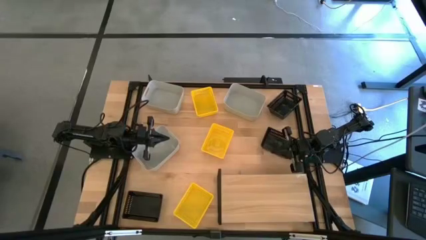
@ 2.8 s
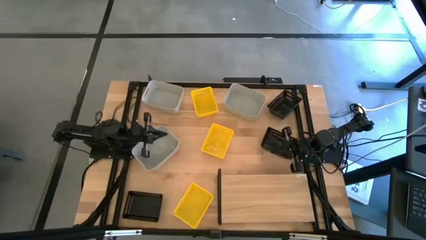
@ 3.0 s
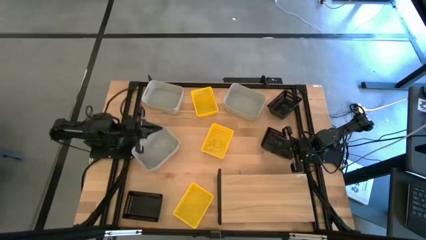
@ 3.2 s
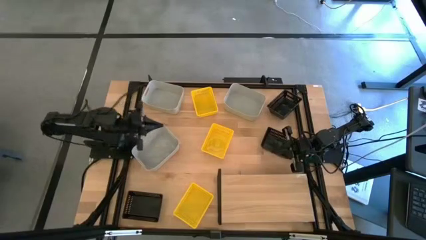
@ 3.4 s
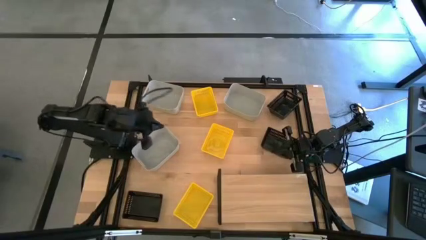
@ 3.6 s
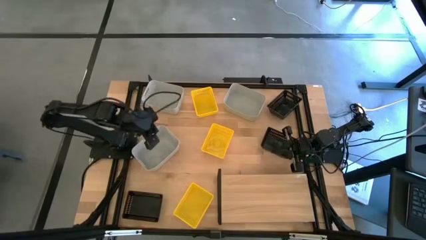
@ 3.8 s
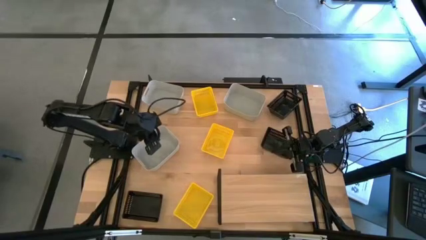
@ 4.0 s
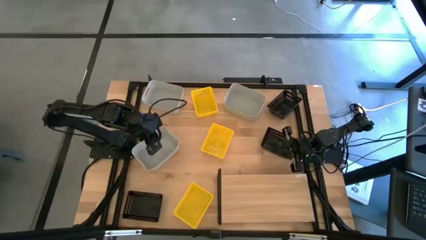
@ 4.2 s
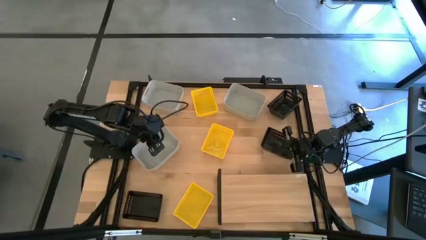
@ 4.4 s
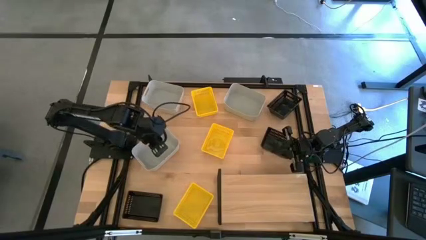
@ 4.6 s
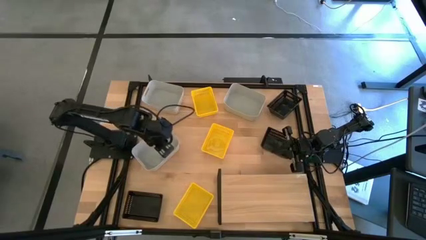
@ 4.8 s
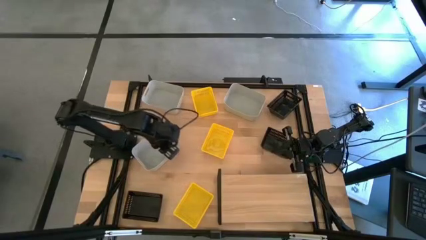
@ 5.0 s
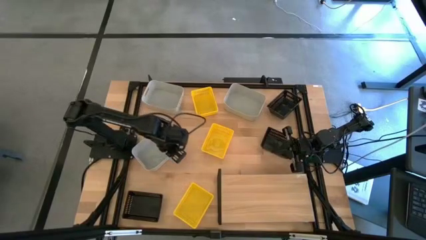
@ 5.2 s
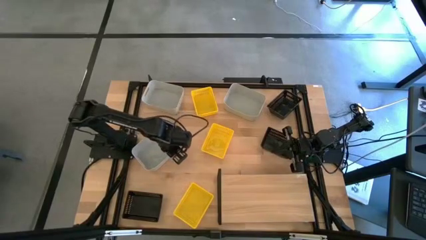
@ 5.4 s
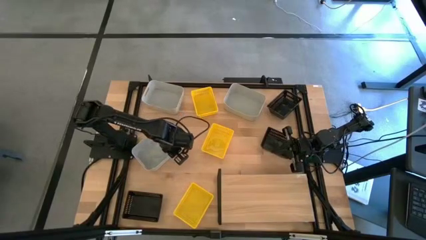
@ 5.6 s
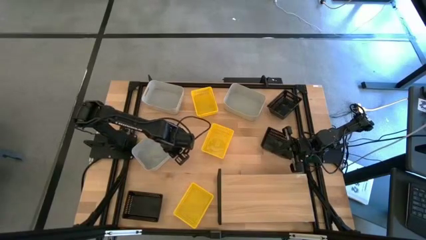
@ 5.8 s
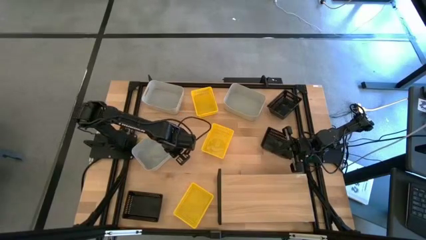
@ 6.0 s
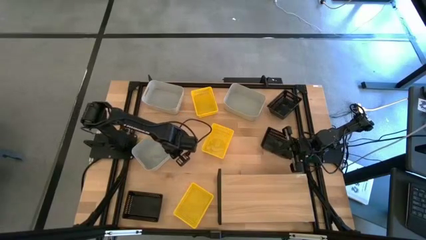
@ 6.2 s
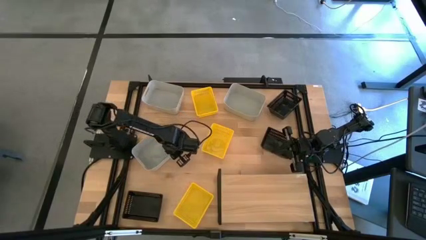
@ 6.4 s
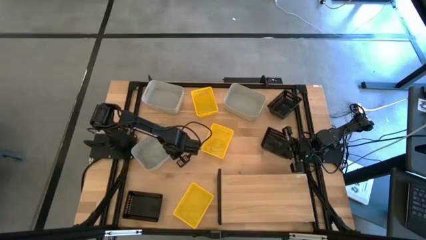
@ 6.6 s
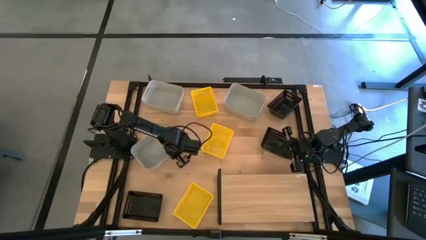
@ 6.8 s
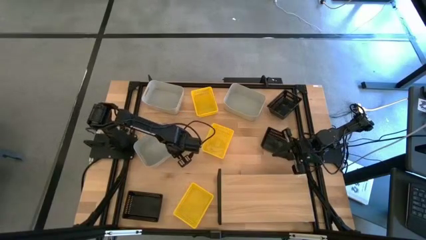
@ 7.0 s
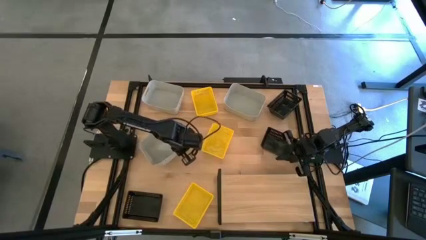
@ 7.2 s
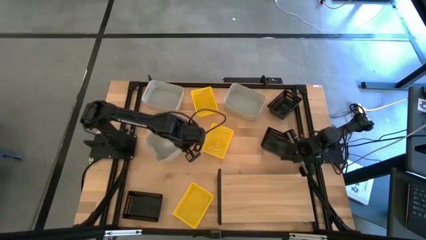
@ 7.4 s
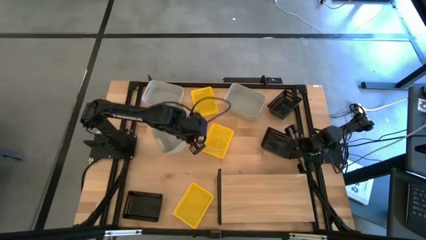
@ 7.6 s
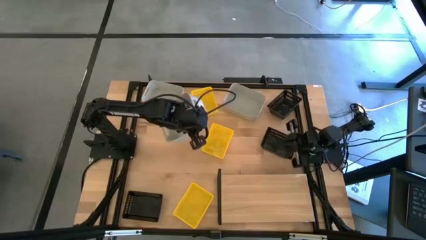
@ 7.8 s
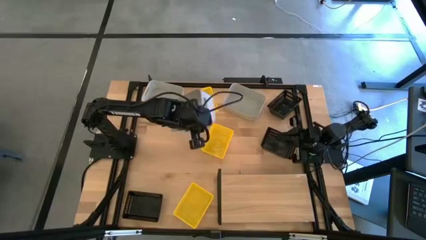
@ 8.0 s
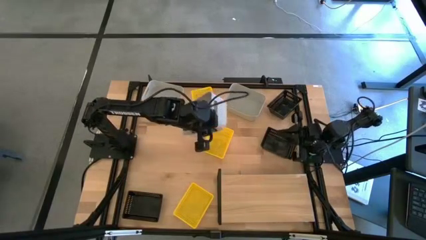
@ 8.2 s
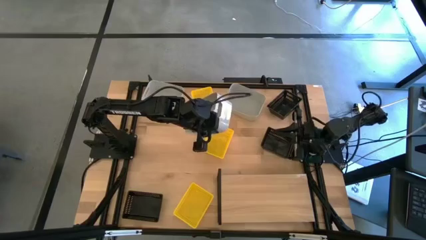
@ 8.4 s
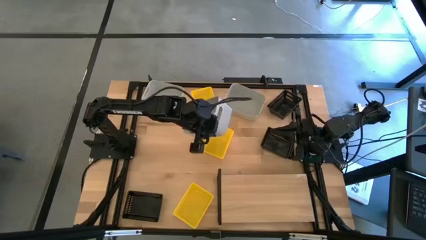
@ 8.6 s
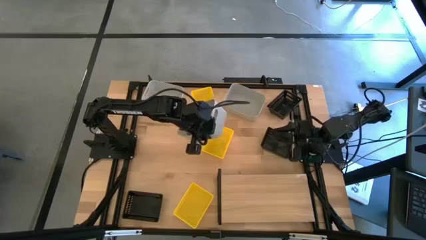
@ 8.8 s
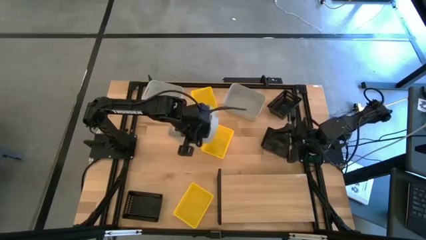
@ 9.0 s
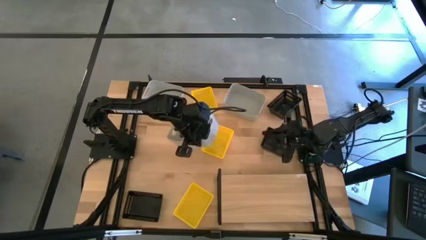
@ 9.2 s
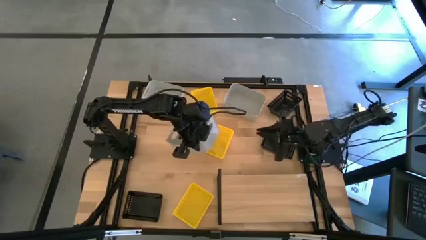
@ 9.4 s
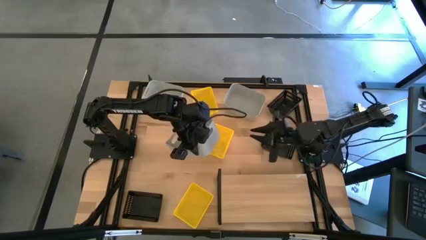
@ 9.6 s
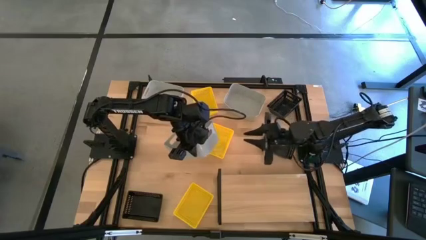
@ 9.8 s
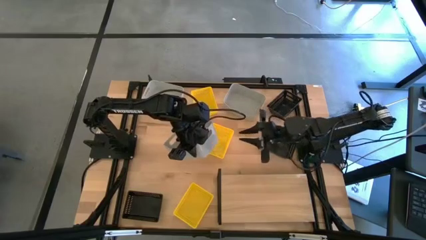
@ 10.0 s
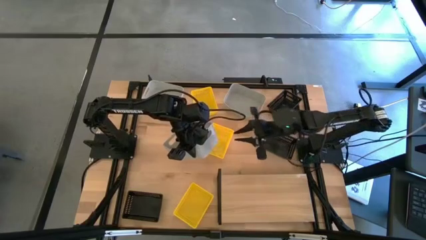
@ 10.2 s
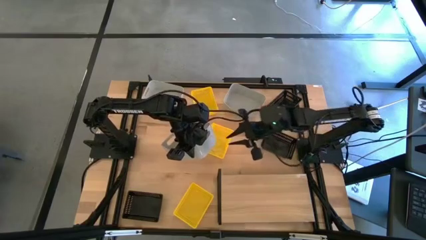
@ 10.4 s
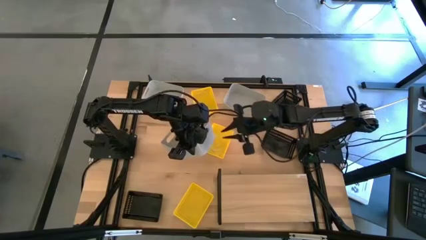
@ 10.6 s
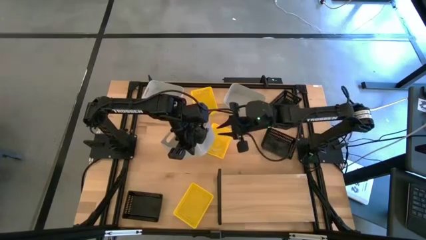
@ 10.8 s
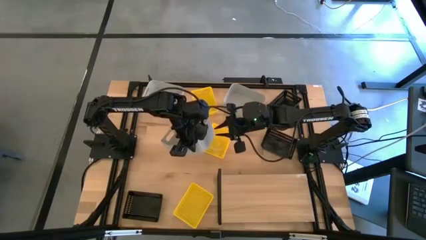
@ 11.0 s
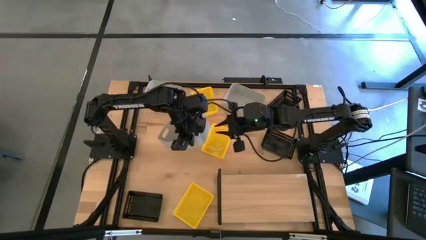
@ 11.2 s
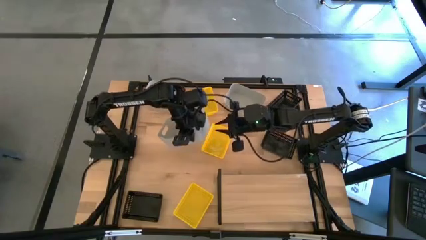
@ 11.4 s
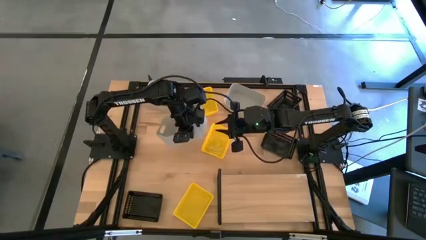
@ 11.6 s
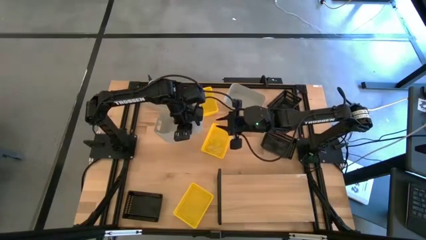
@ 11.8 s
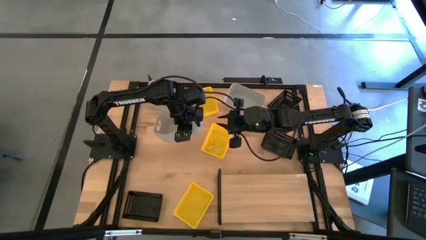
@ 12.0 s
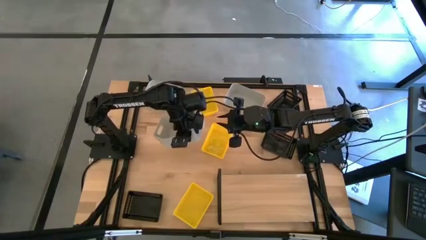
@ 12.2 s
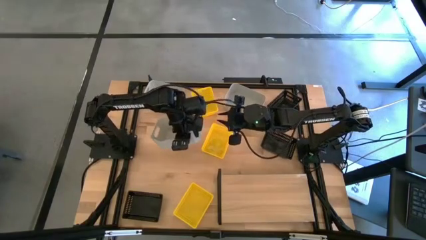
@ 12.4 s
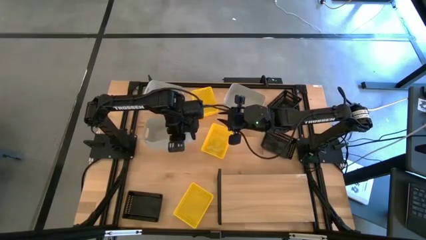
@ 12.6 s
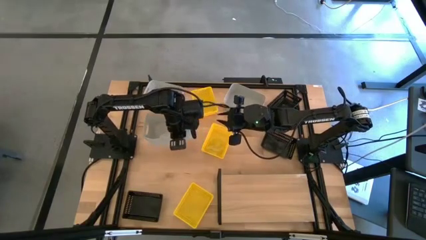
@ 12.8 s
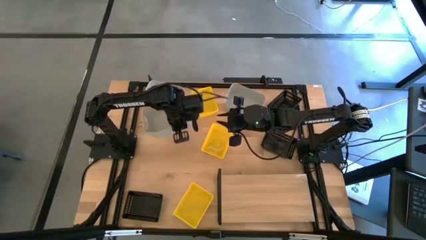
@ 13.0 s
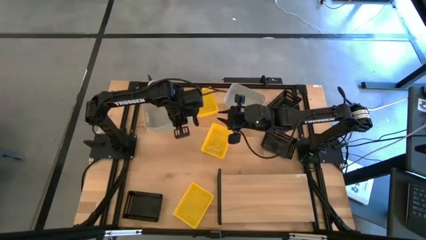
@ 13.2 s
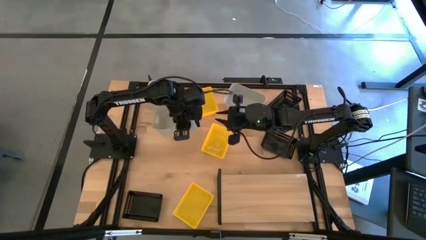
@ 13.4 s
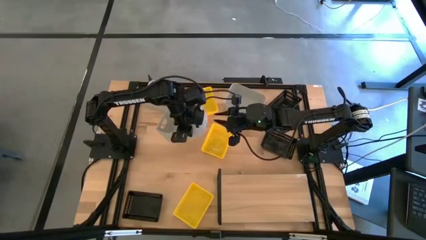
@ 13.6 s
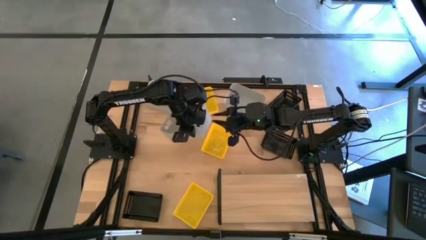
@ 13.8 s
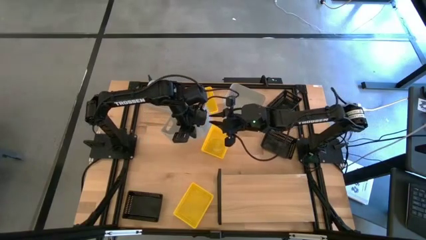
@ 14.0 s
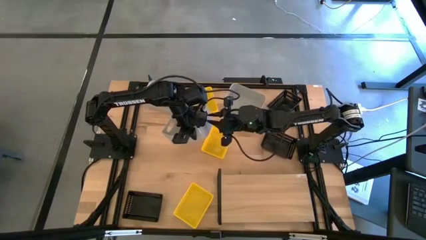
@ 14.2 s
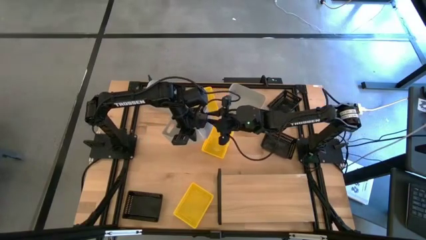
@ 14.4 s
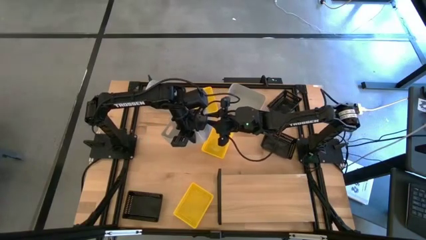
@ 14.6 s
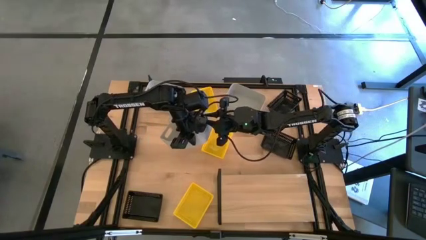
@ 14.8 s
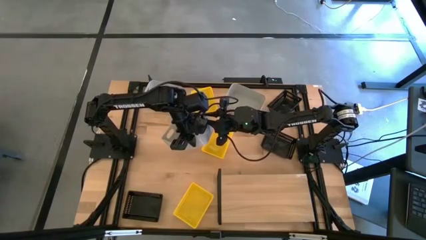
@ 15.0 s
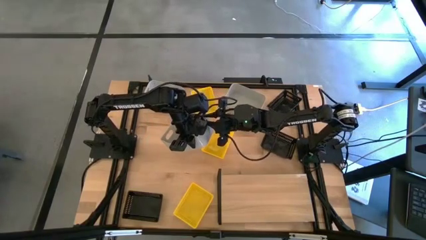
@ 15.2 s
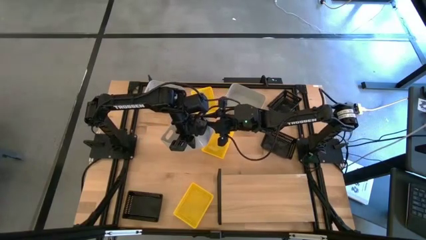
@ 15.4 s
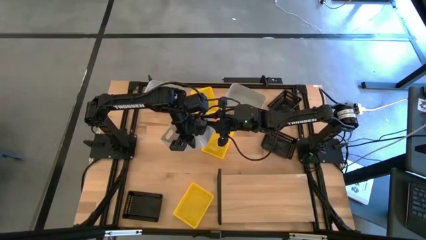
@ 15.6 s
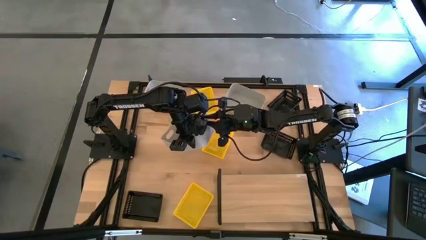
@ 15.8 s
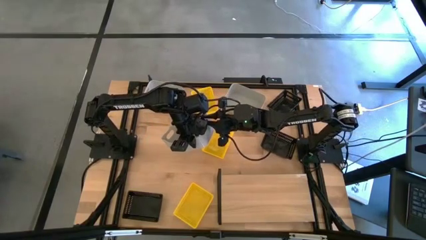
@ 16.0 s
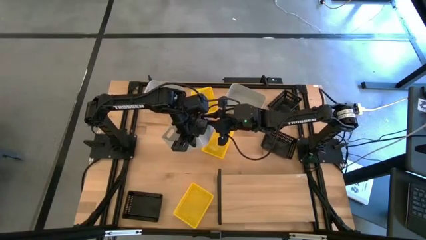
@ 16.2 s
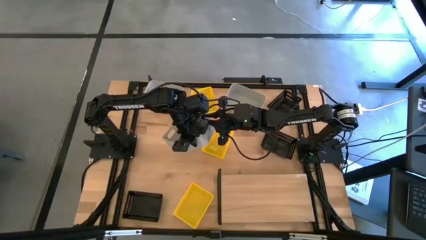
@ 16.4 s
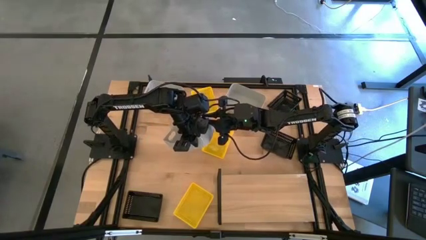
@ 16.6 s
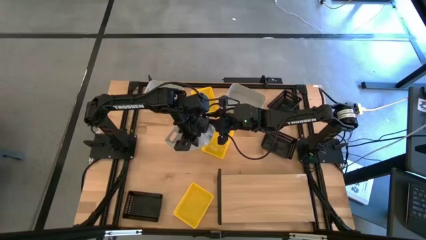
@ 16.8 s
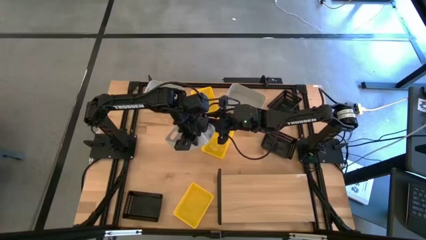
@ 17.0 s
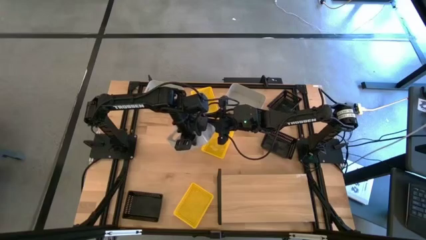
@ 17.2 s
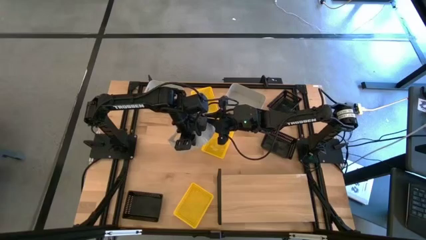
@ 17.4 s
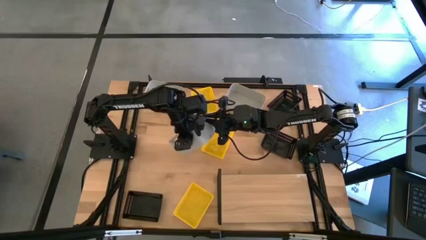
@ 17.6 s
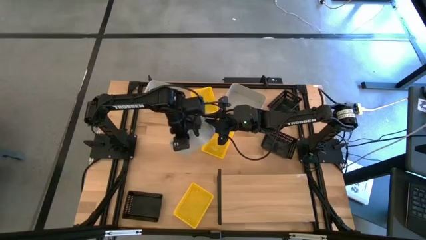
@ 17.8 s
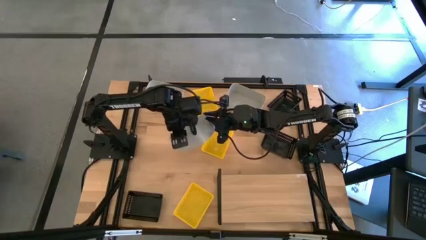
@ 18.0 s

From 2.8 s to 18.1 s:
Task: Stack baskets on shelf by color
Put the bottom left gray bin on the shelf
